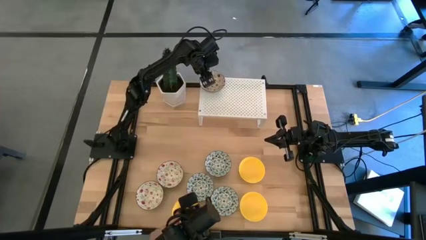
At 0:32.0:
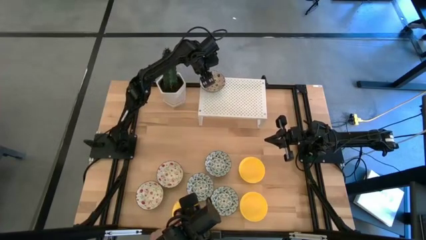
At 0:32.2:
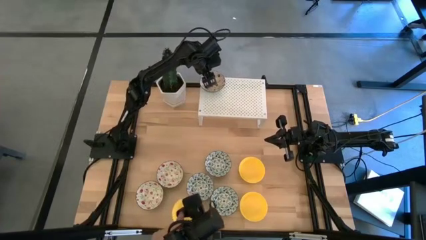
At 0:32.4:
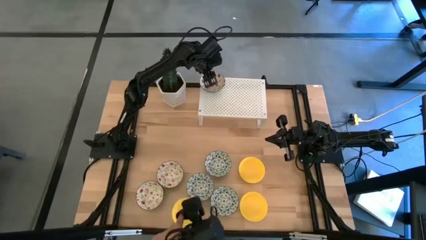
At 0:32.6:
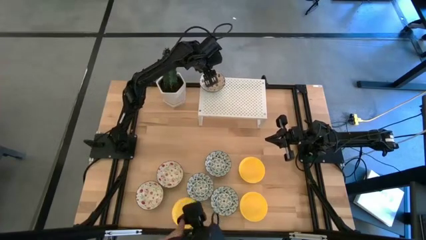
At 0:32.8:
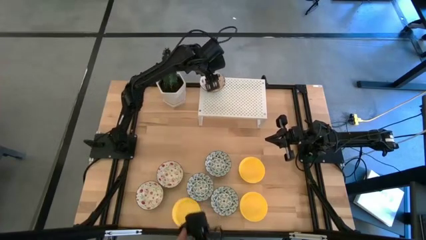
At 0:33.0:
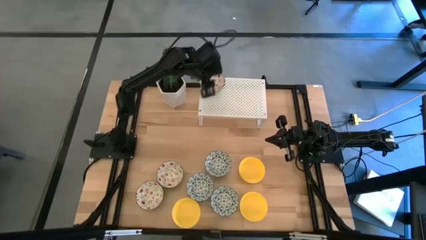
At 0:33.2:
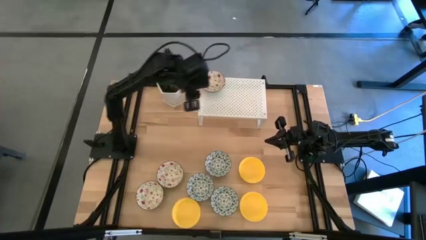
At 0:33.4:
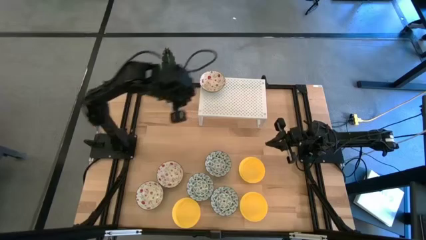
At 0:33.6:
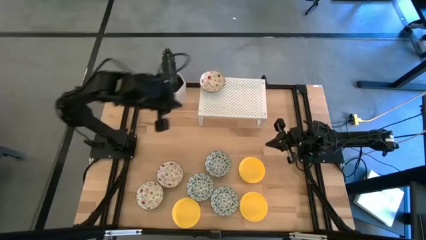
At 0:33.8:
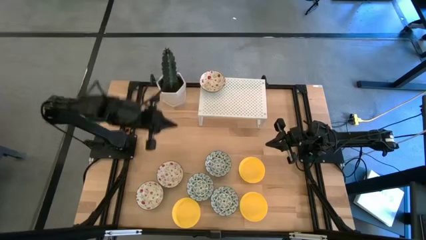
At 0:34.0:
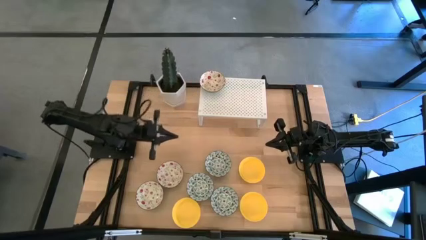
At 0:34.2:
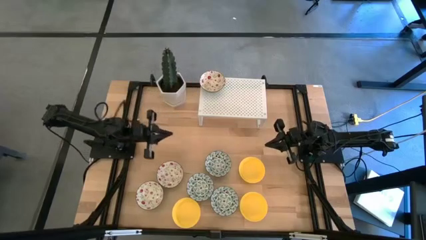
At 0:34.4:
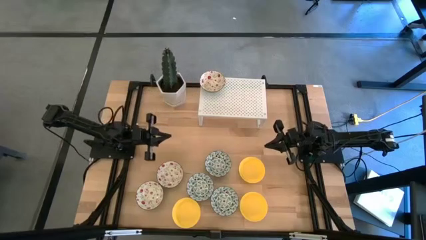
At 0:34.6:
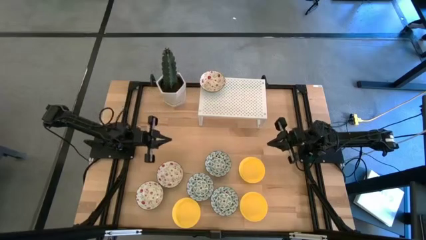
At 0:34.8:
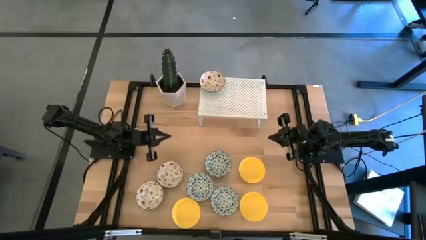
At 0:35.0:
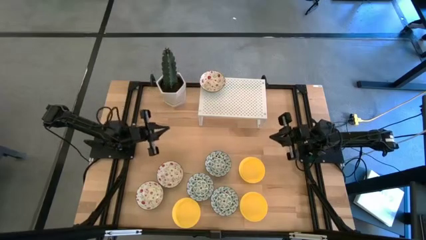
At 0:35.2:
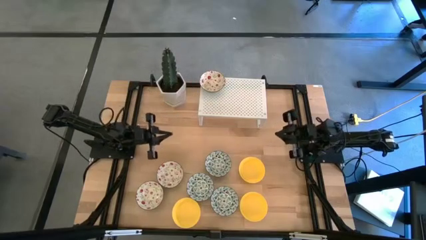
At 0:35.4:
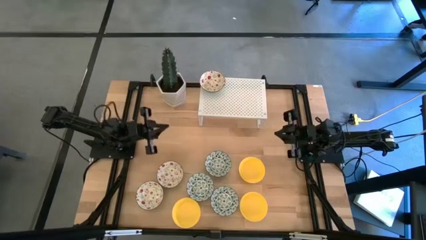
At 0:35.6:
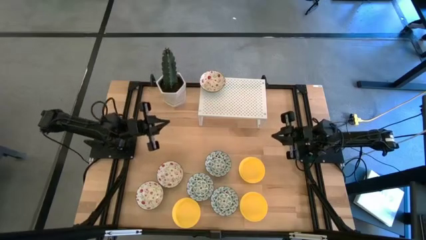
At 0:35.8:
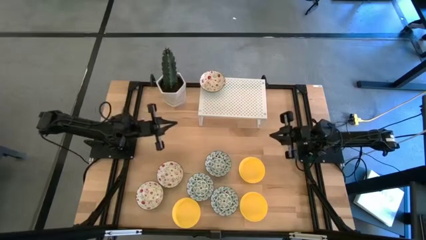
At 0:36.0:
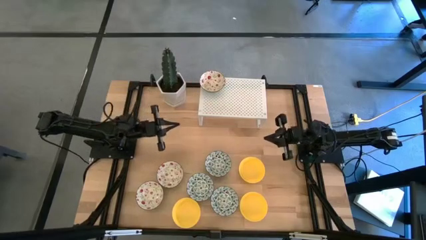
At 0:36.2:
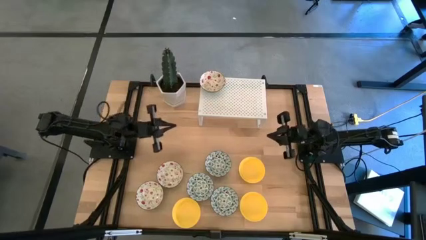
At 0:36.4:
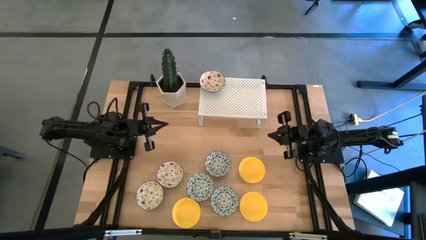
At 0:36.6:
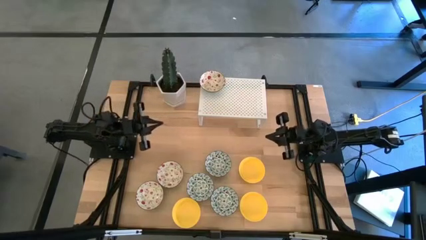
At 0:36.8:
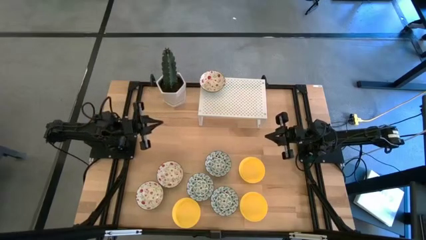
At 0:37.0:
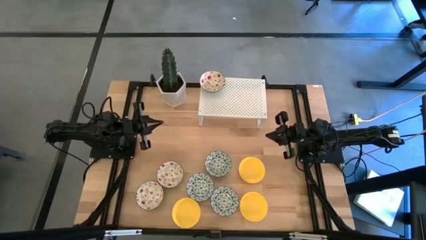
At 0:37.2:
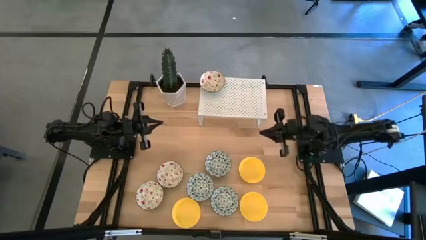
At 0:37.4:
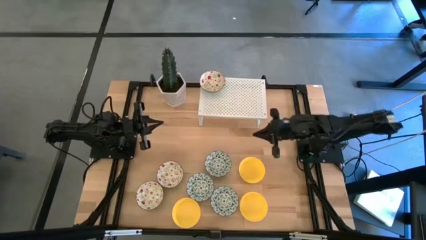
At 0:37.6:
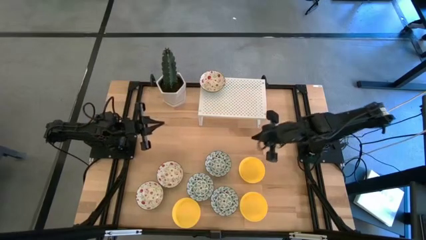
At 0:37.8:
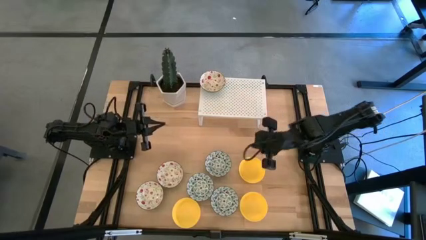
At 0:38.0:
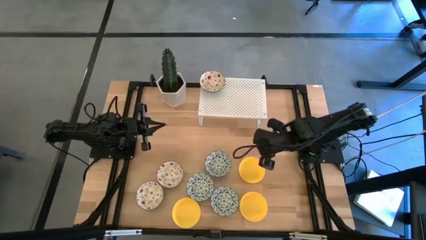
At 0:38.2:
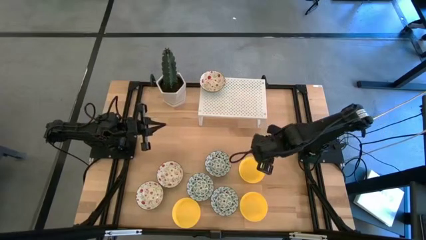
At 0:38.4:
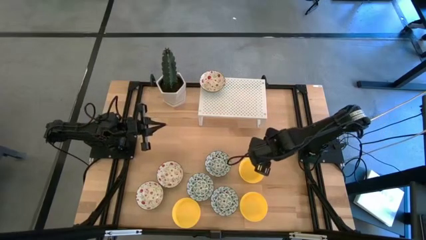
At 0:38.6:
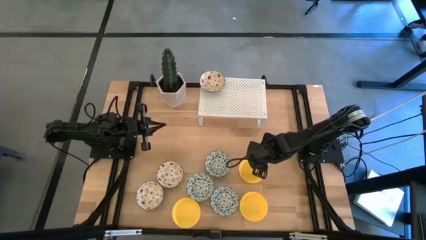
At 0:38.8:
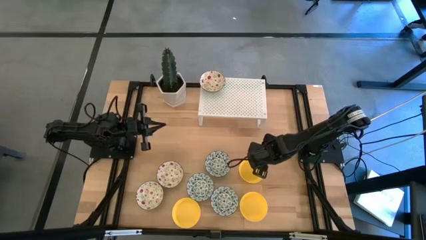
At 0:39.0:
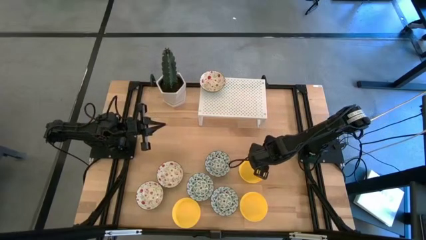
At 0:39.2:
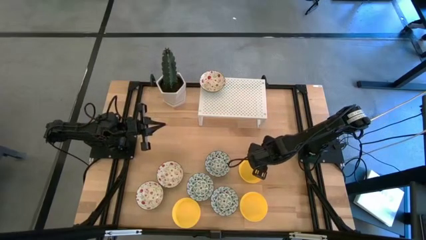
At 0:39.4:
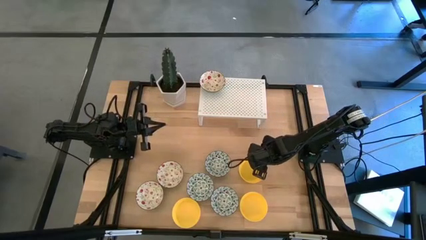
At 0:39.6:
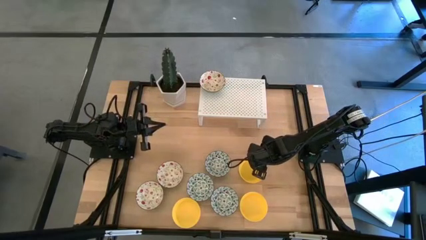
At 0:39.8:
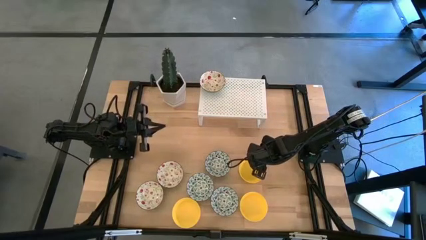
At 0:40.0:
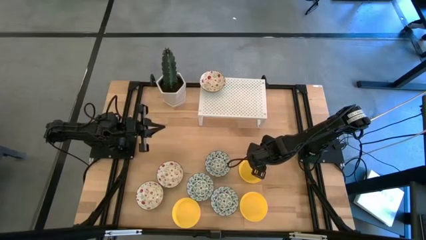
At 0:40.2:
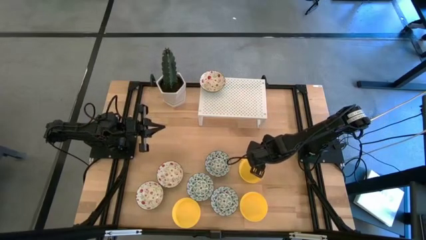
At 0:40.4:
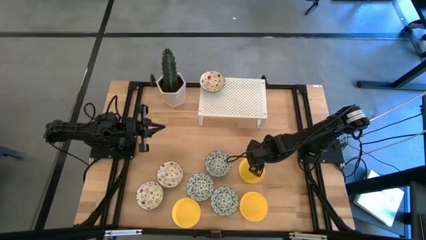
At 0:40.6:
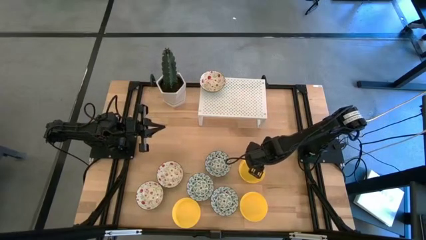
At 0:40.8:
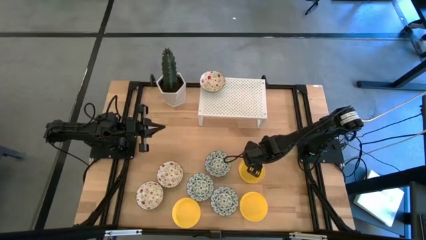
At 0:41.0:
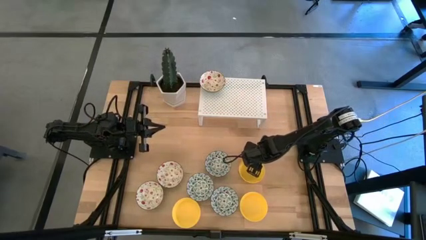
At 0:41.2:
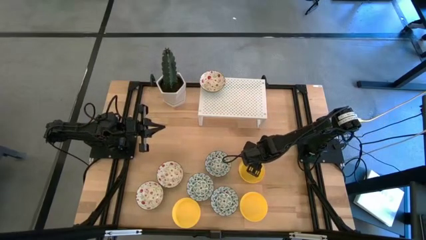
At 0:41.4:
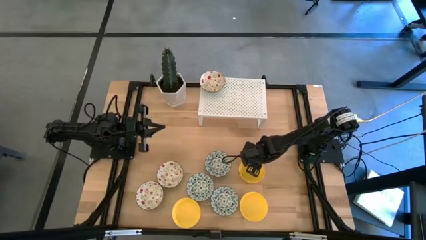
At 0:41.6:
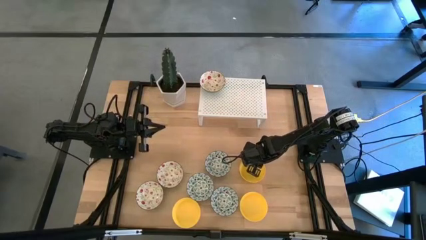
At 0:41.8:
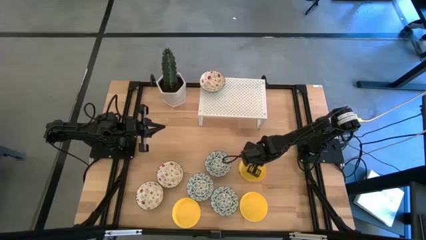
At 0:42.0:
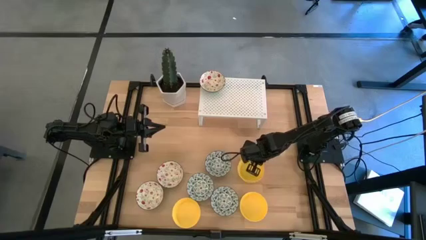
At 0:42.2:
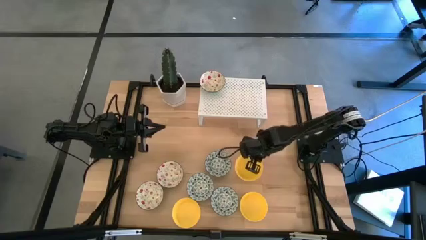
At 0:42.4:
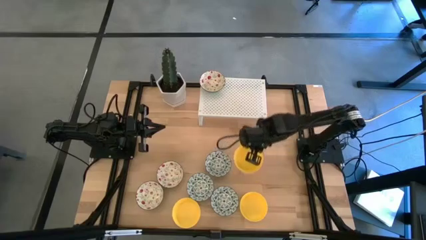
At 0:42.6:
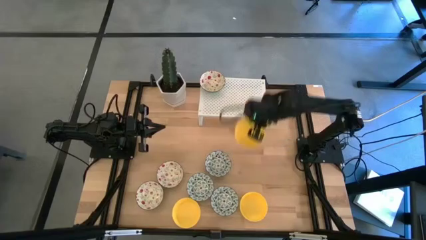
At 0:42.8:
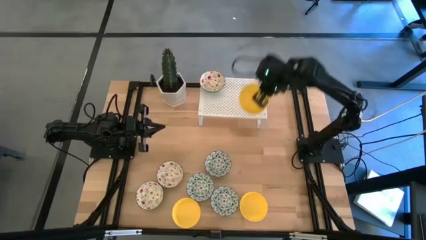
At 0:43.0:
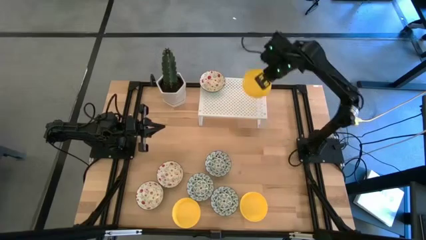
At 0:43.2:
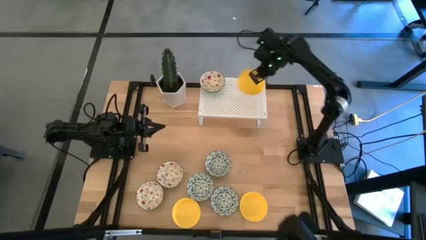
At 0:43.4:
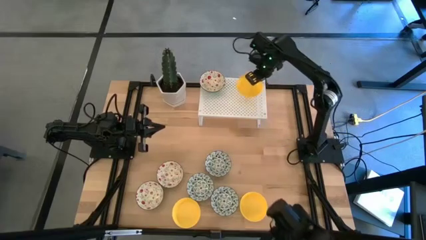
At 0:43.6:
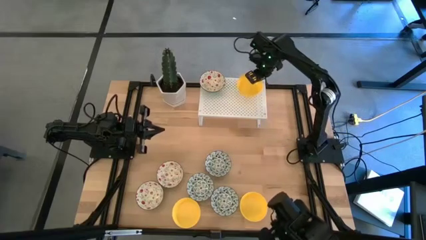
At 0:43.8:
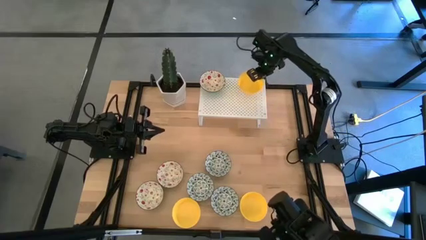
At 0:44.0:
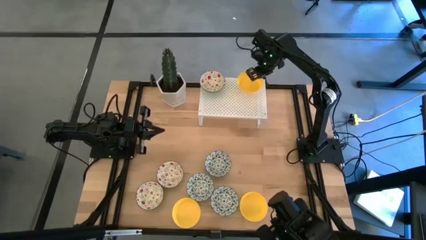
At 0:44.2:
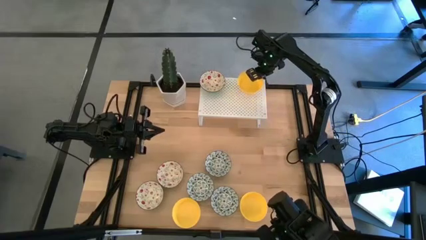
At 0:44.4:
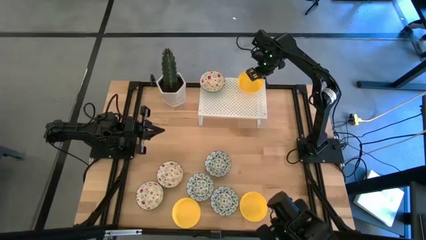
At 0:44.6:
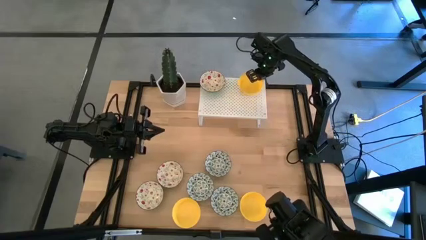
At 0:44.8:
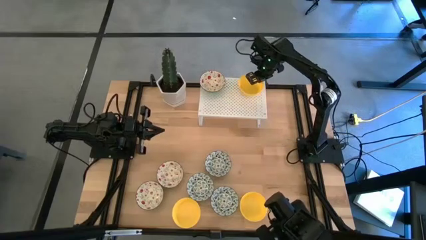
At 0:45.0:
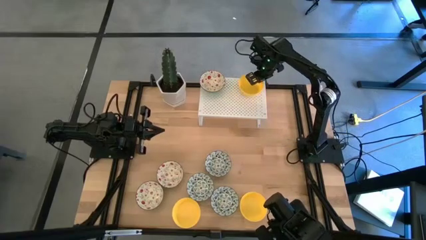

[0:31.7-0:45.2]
Task: Pick & Place Mini bowls
Put the top left yellow bowl on the shelf
